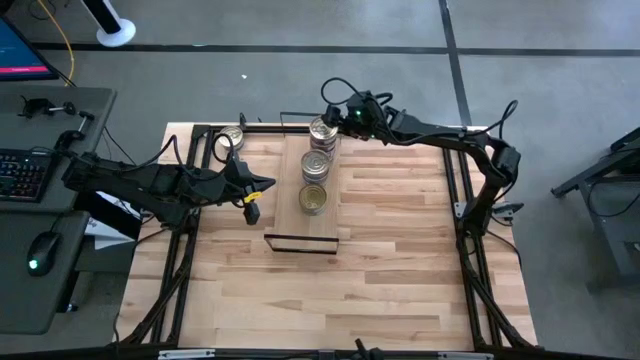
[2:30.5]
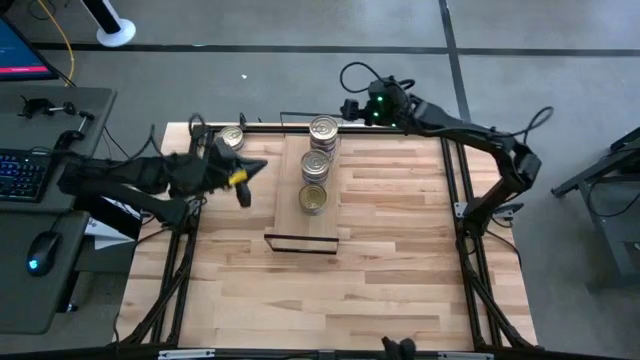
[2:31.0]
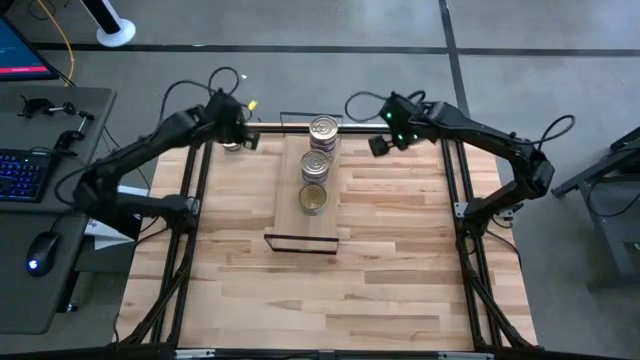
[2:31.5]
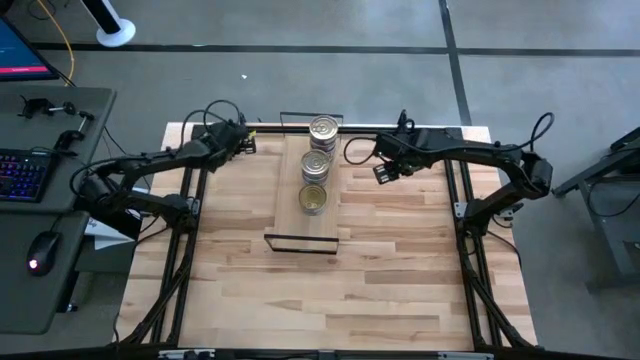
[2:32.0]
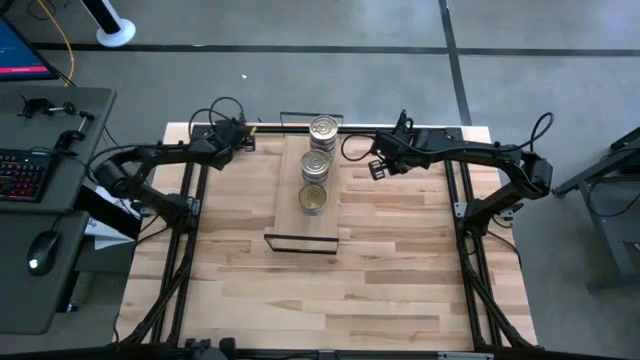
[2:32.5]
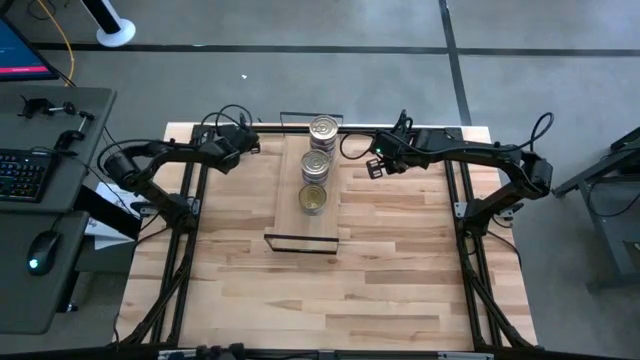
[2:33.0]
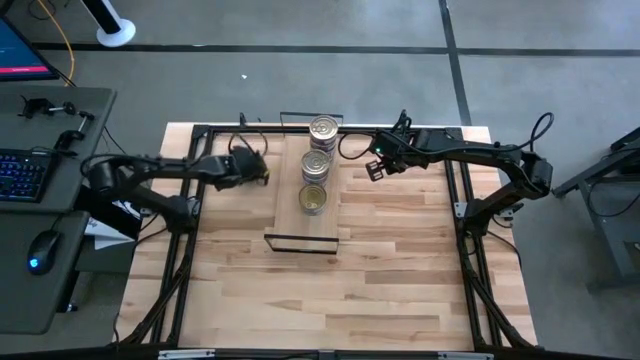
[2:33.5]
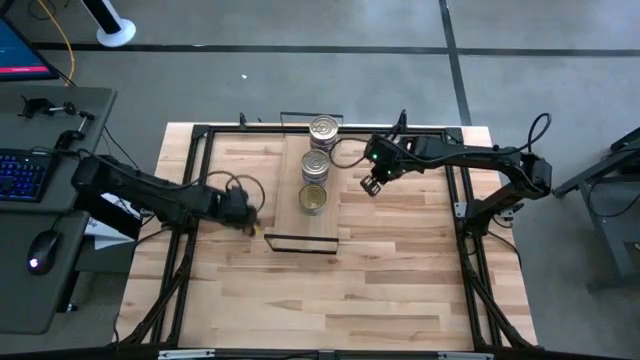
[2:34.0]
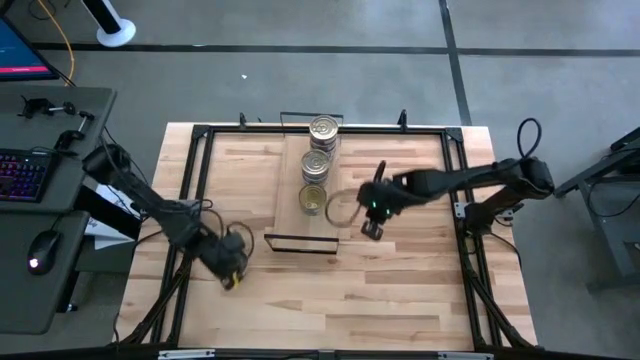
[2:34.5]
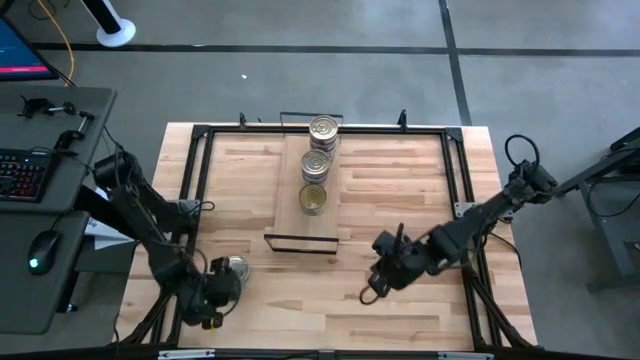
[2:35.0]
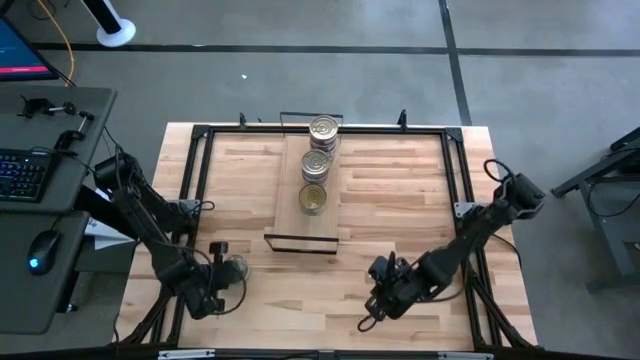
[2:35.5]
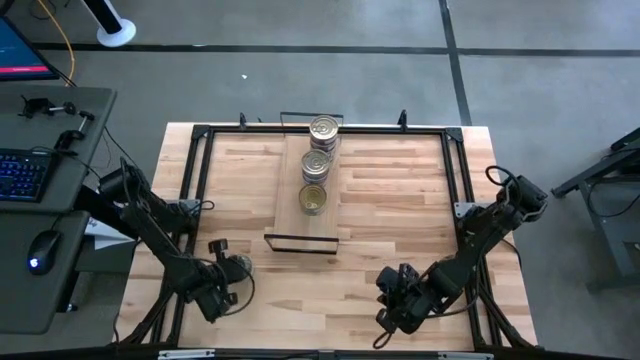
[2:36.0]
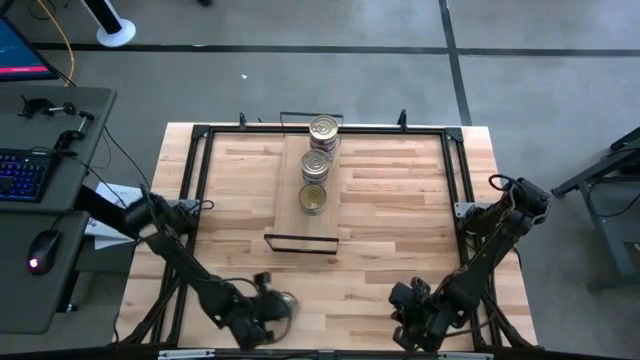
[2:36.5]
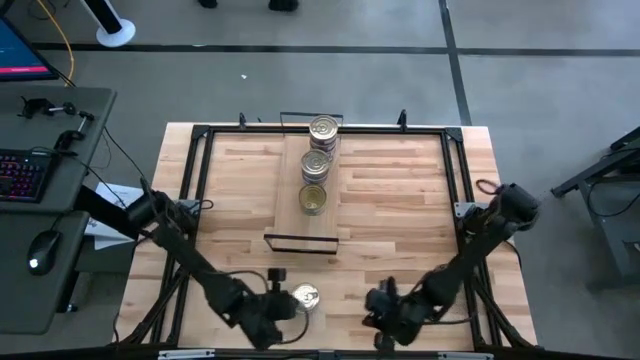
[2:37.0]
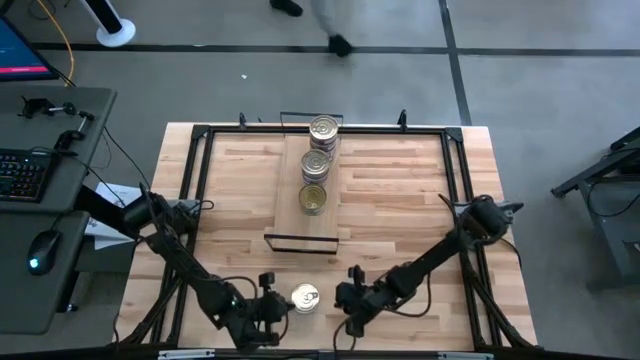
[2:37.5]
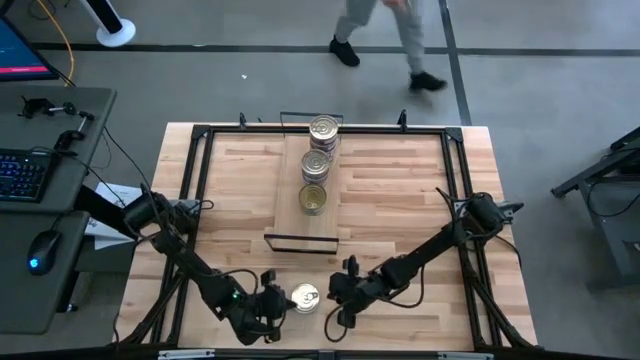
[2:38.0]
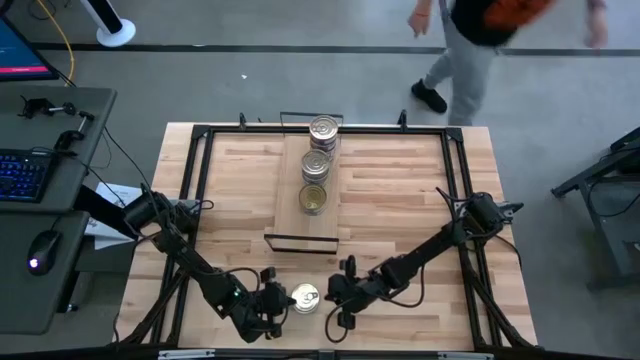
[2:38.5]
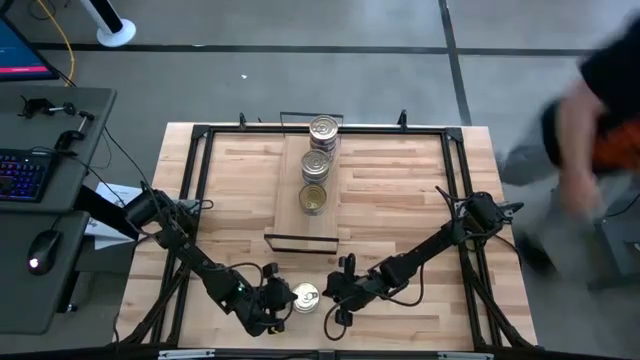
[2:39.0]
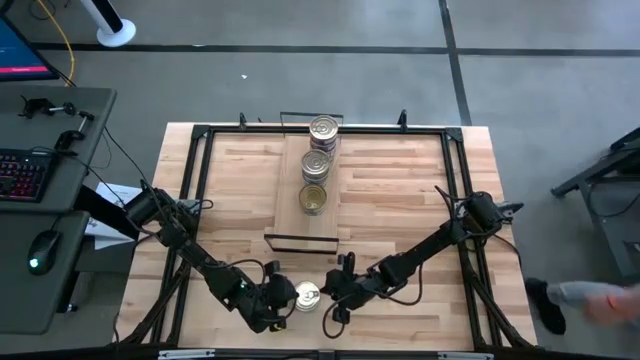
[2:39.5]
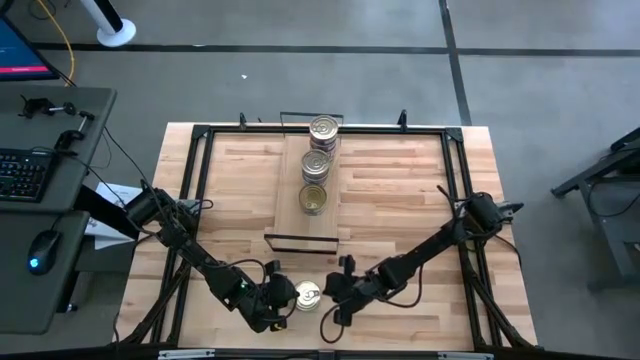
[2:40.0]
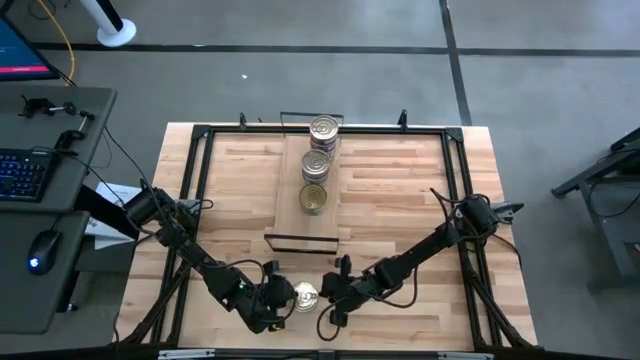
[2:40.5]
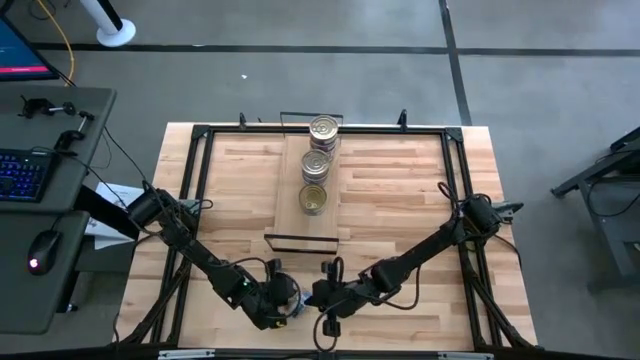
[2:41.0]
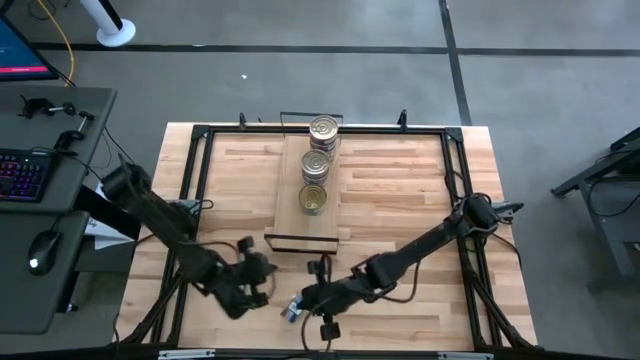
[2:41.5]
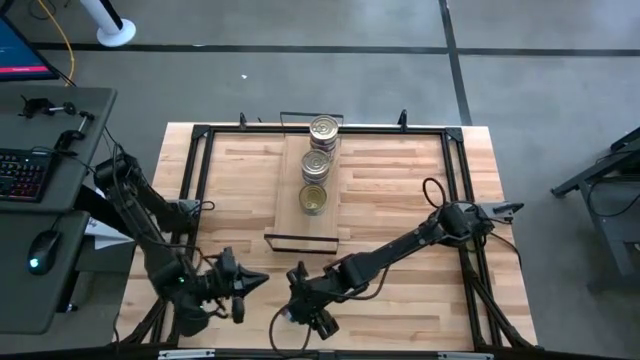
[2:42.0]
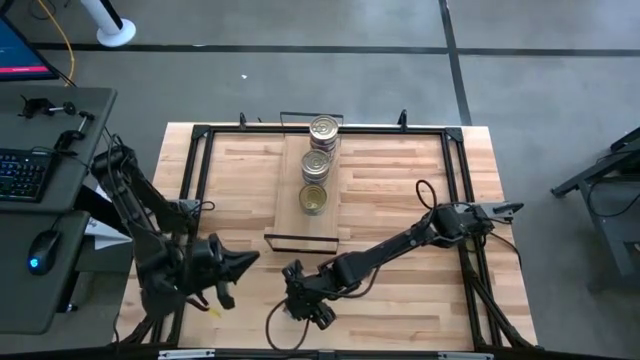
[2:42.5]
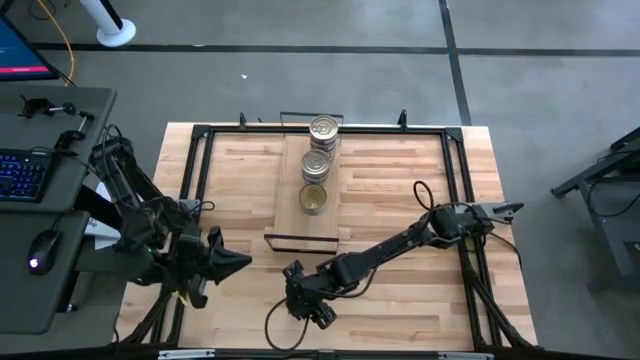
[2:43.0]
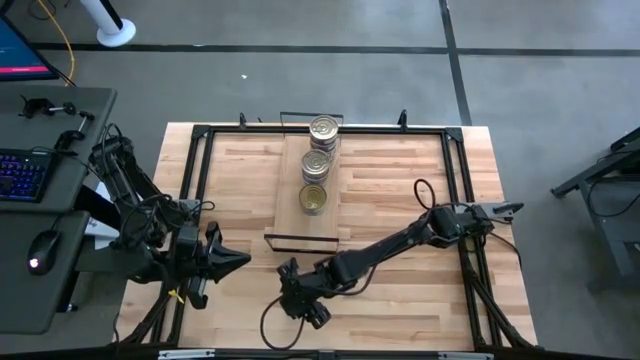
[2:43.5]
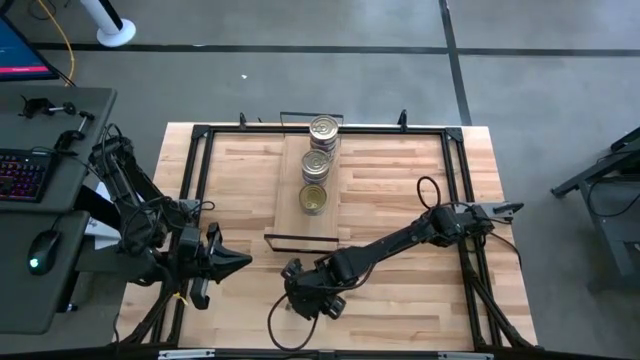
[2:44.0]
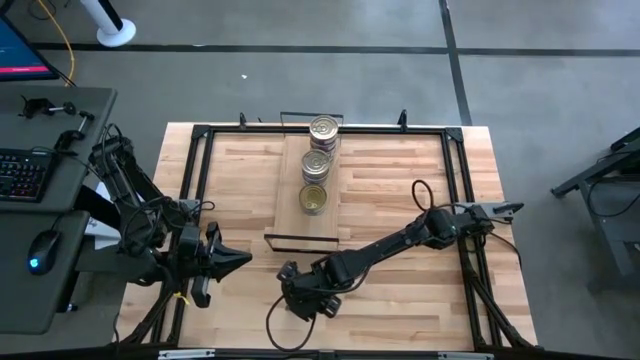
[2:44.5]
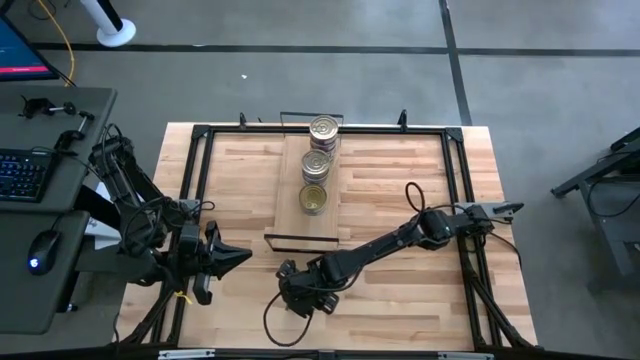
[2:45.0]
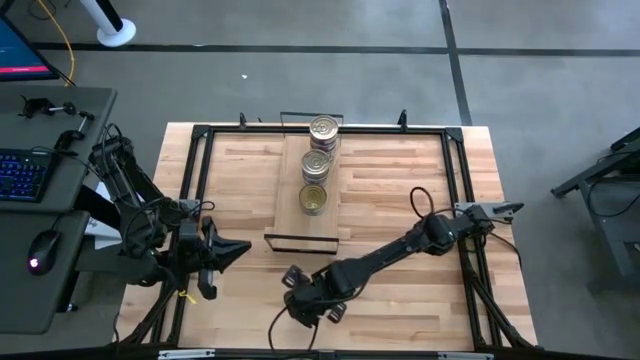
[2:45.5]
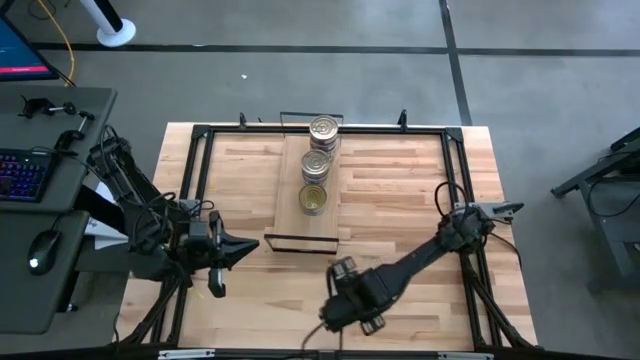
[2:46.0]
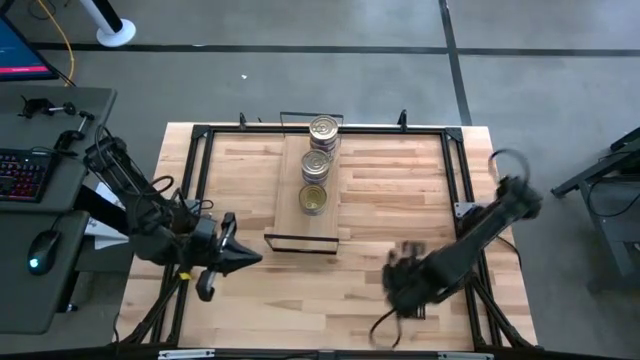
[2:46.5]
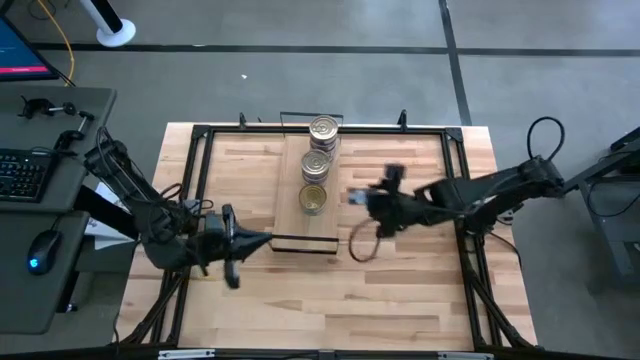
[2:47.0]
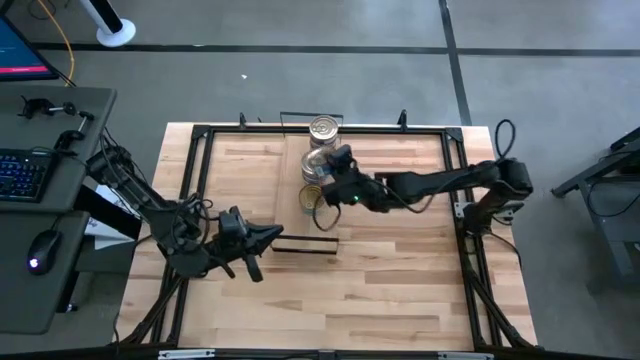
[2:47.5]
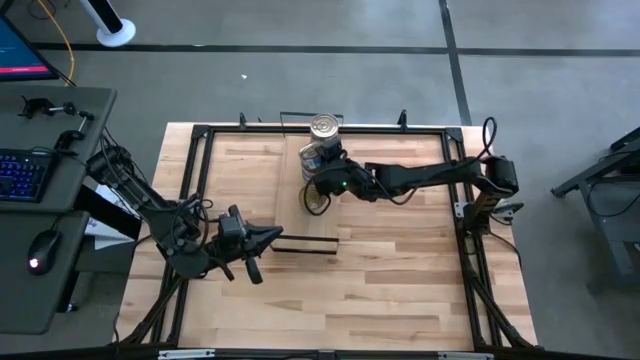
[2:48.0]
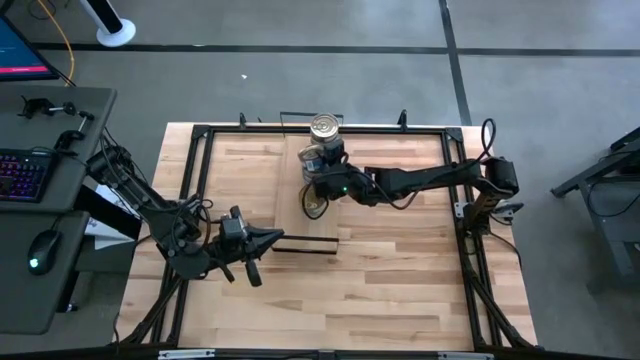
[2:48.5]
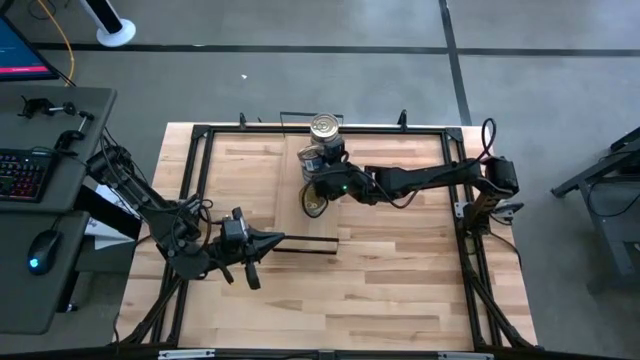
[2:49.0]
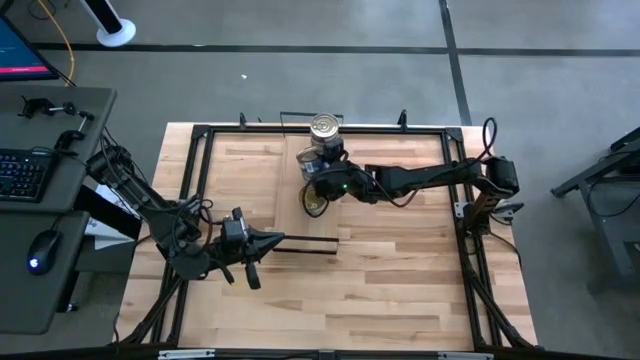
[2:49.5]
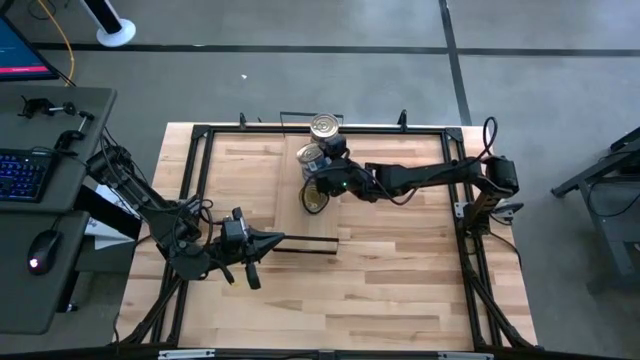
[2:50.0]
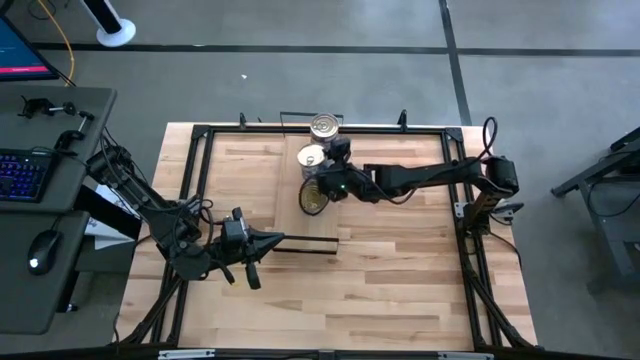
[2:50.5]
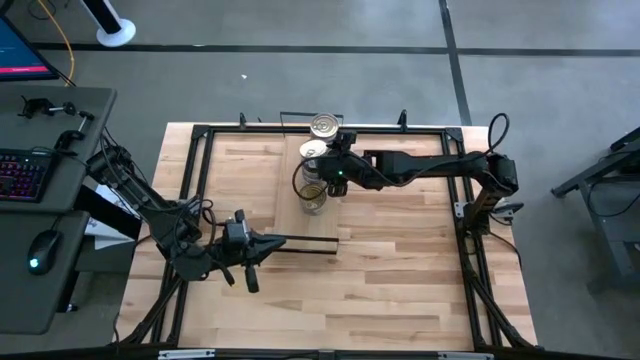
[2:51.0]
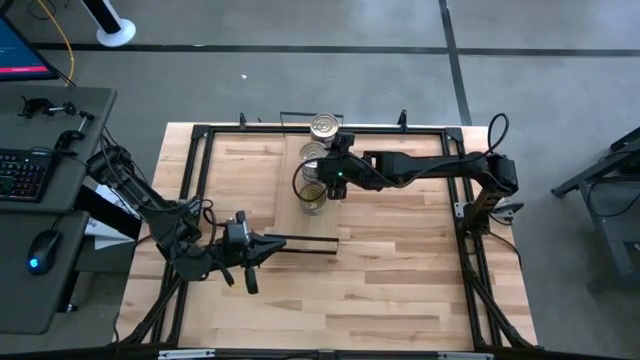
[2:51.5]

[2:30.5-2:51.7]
Task: Stack canned seafood by type on shelf
Stack the blue pink tuna can on top of the other blue pink tuna cans on the shelf
